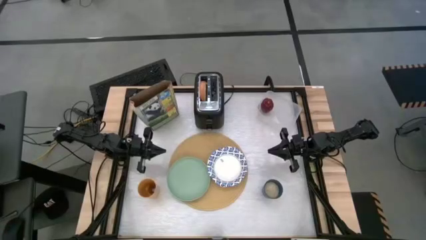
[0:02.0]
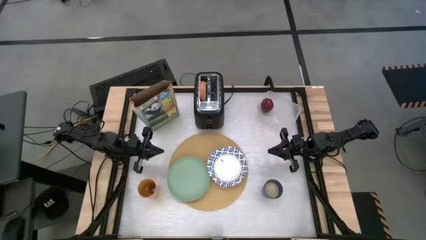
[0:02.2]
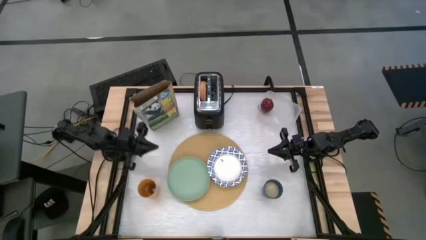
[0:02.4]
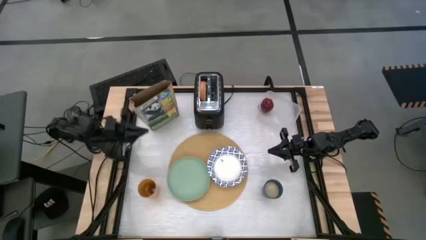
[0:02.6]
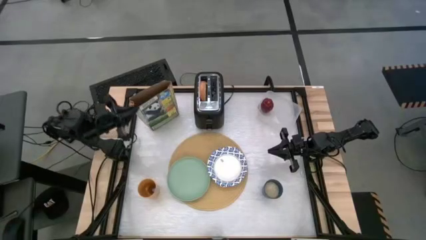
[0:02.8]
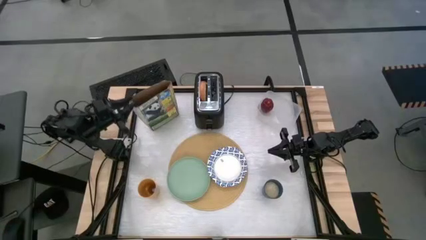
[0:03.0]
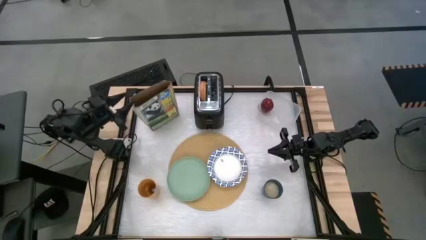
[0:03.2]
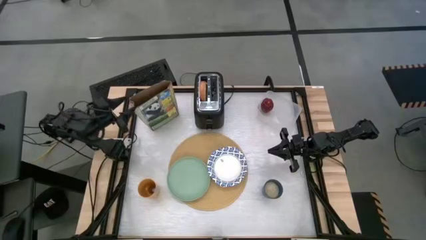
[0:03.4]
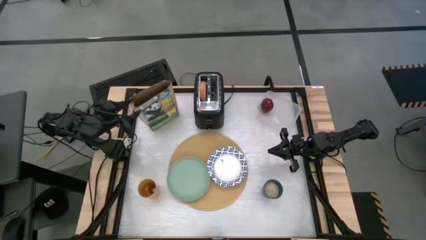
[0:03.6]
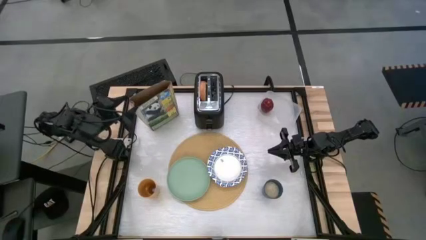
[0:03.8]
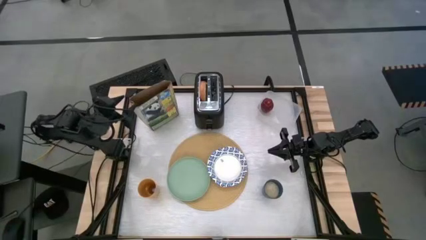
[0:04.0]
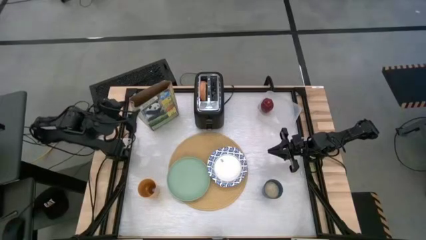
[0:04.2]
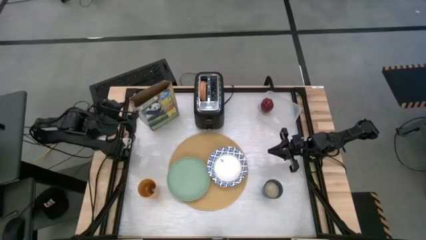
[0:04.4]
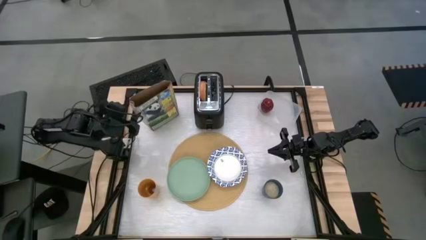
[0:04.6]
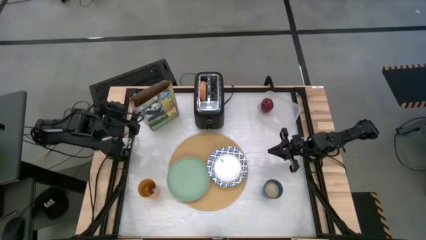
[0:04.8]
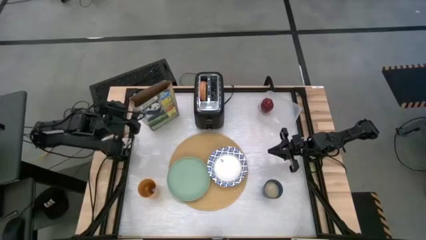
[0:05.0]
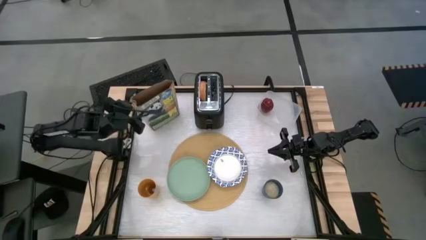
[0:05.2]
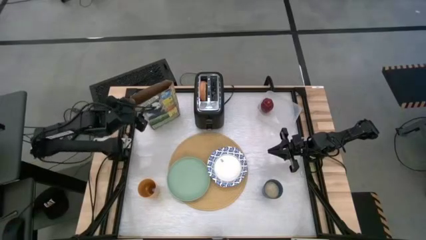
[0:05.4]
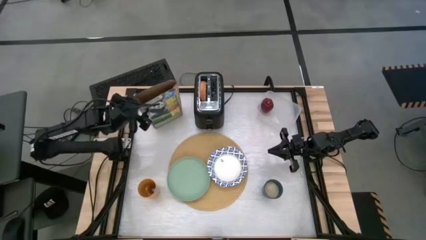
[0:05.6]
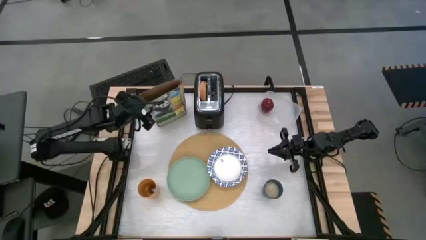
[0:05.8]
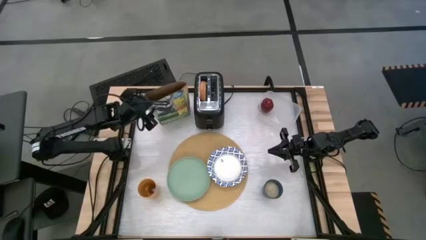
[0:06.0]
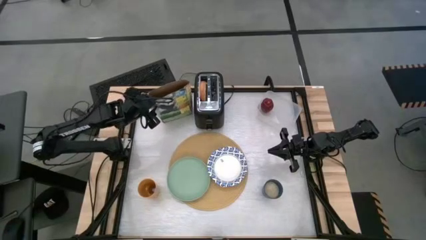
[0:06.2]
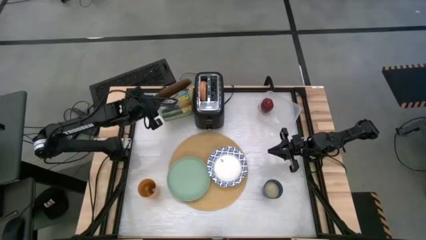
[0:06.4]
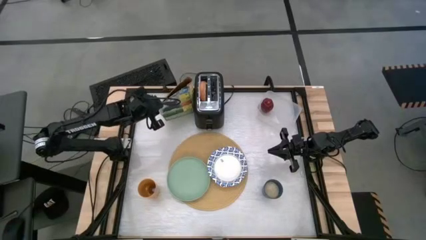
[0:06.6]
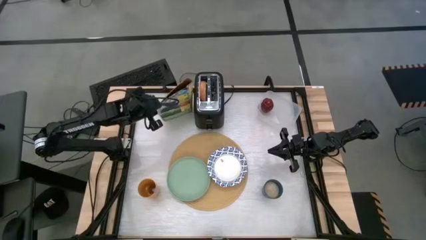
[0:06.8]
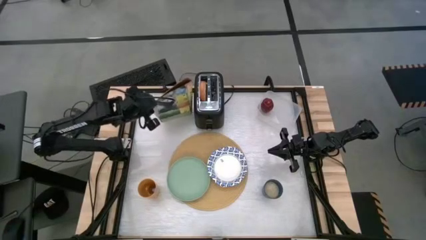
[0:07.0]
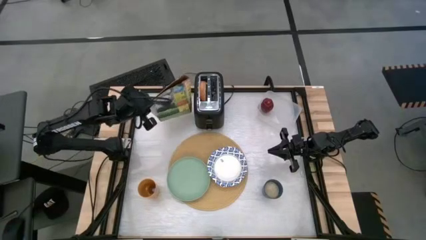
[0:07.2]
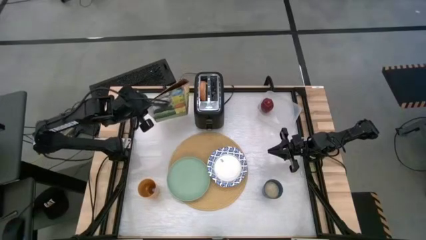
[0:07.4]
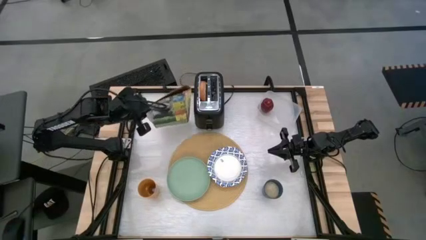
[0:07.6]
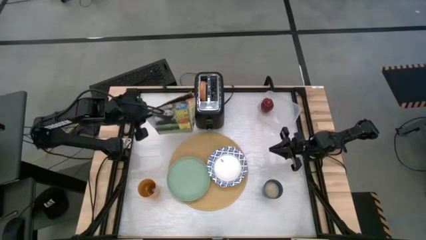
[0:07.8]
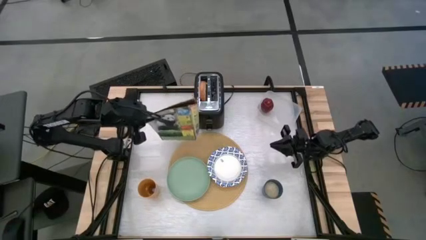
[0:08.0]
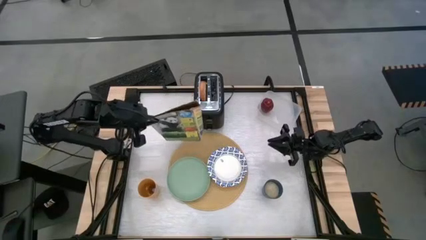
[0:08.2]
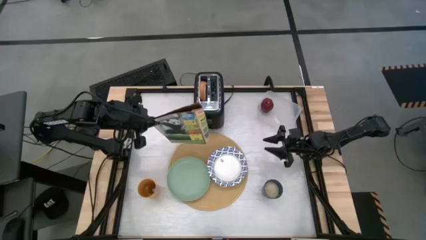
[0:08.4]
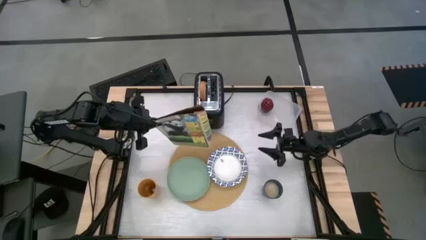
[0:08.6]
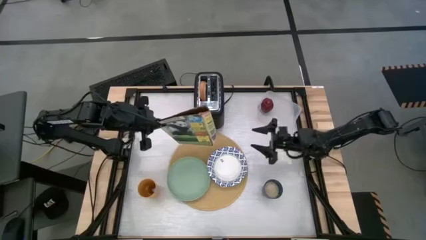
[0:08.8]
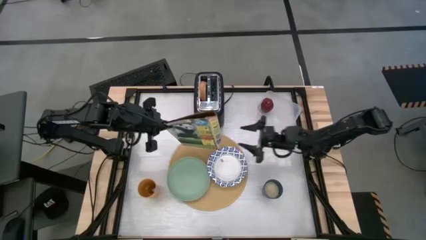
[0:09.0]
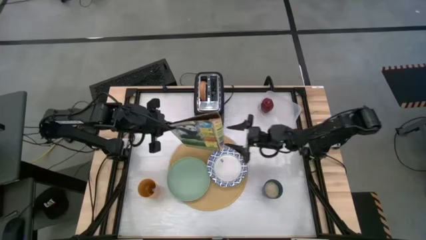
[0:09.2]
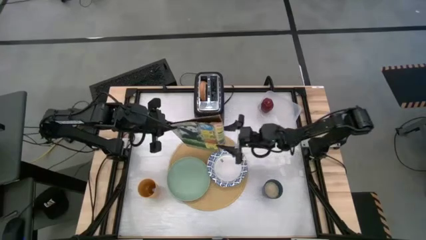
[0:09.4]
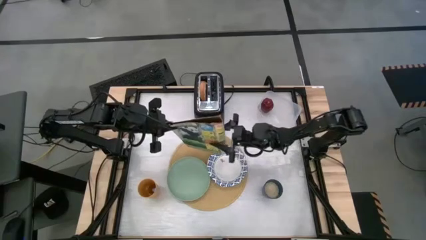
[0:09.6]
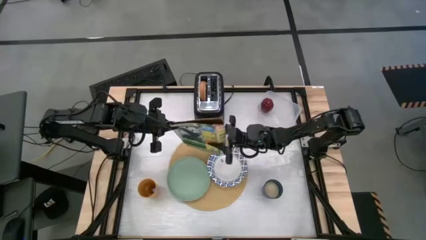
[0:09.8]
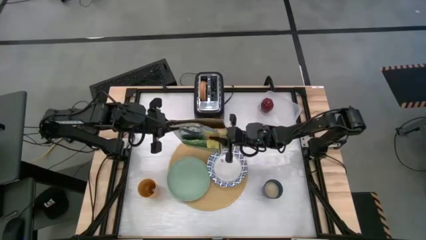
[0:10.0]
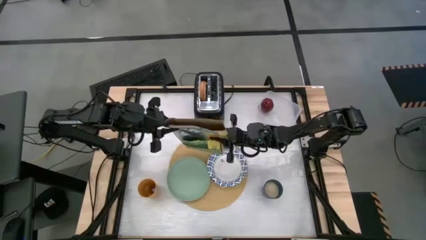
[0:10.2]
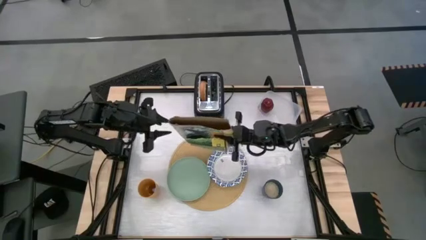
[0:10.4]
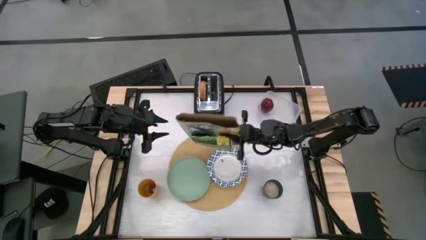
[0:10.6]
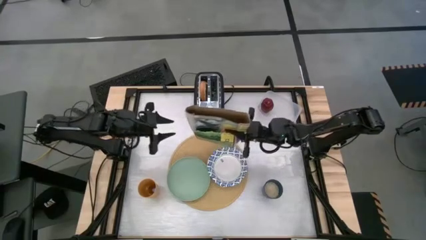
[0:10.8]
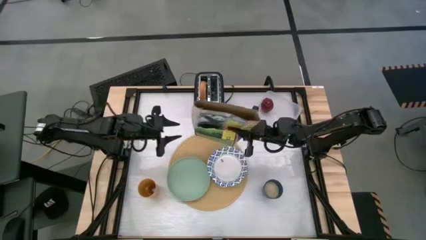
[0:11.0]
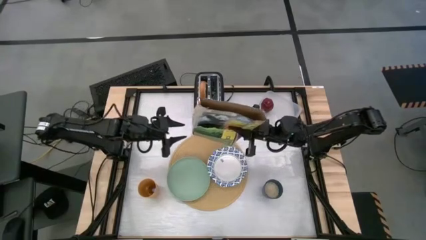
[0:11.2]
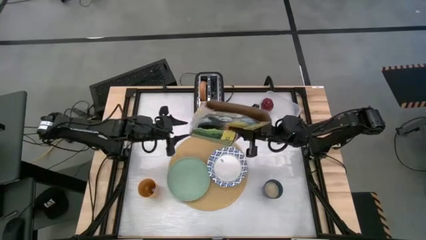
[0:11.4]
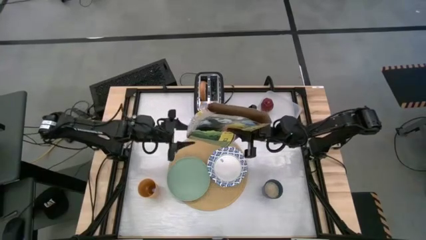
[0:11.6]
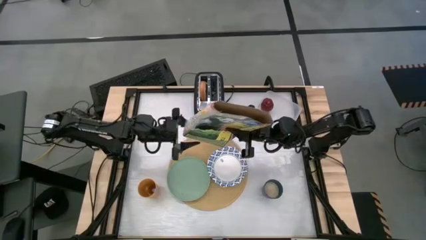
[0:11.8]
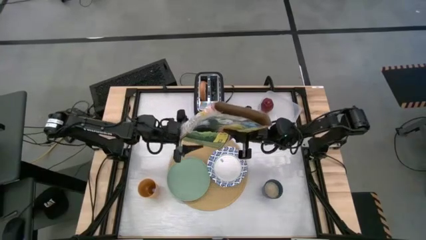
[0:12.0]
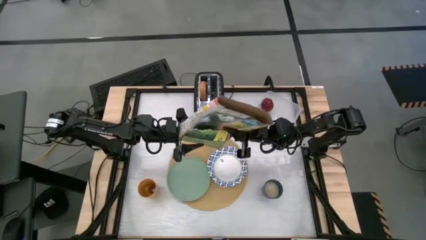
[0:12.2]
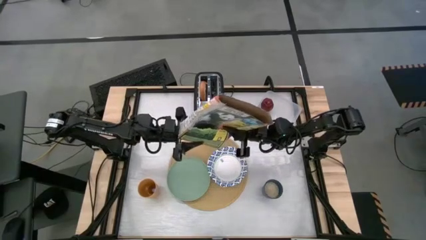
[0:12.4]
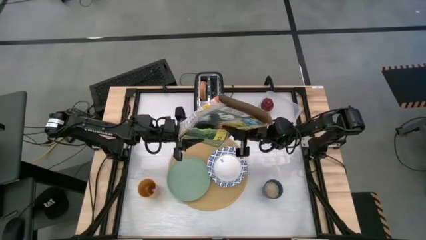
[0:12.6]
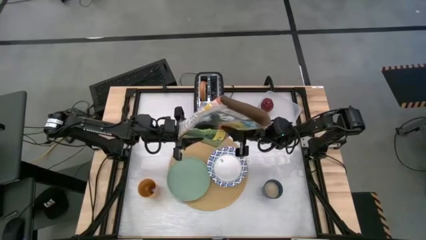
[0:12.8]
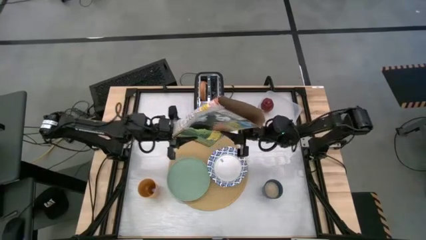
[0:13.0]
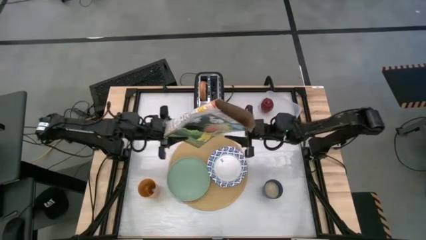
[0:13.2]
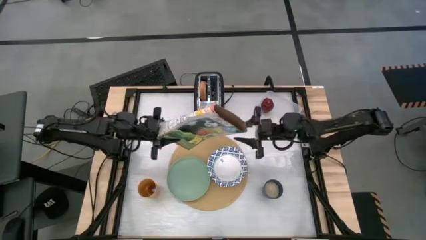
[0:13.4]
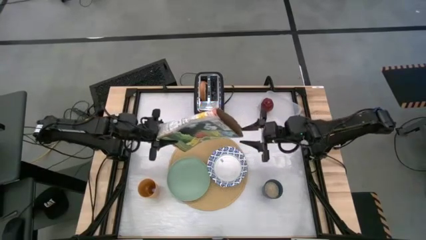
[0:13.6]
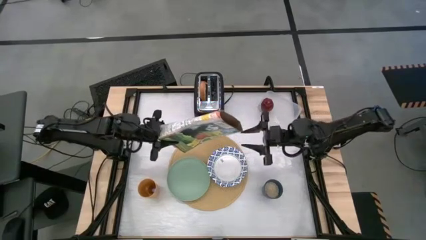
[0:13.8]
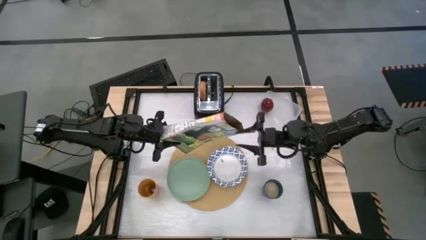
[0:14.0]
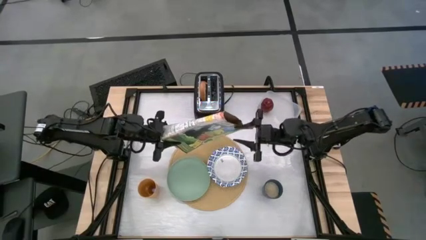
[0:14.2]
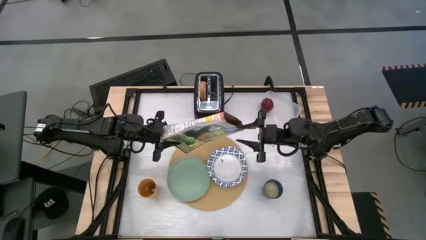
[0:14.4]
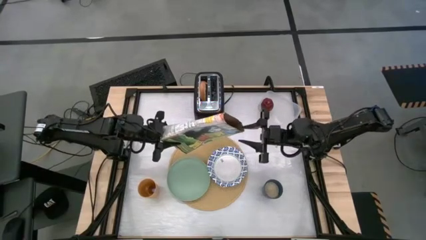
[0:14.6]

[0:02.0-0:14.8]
Task: Arrange a breakfast setting
Pour the cereal from the cereal box into a bowl
